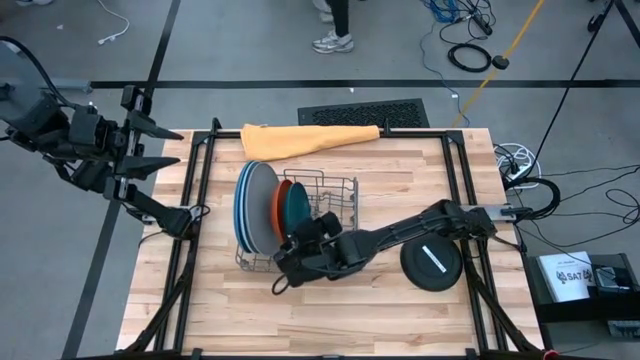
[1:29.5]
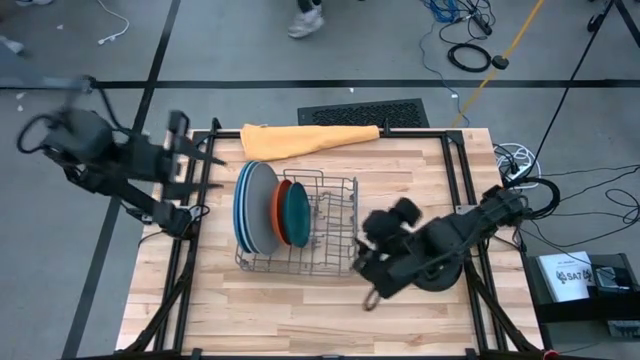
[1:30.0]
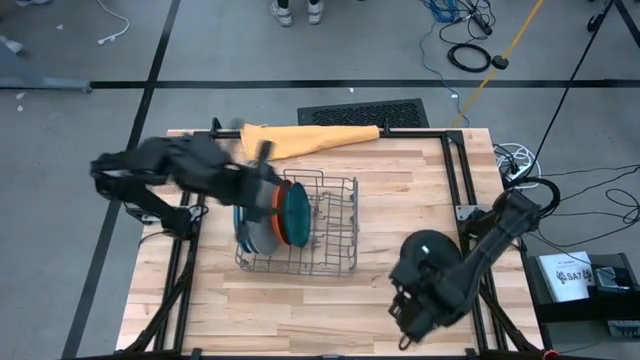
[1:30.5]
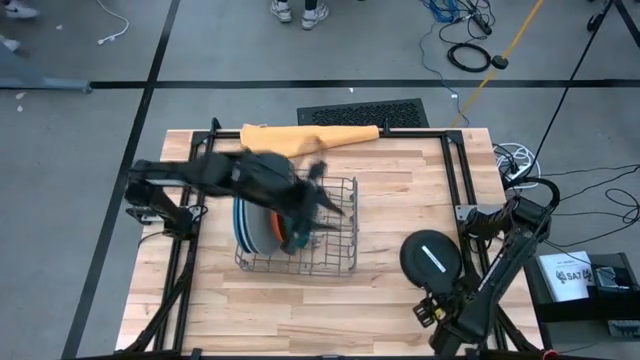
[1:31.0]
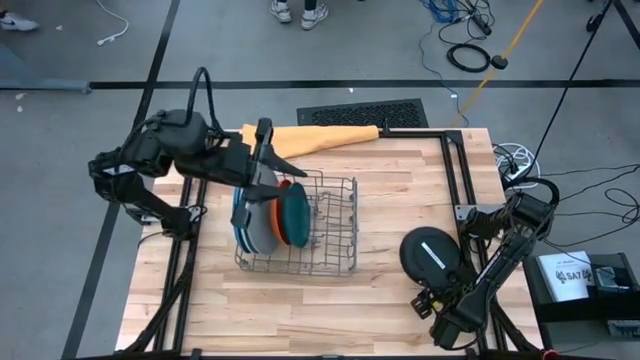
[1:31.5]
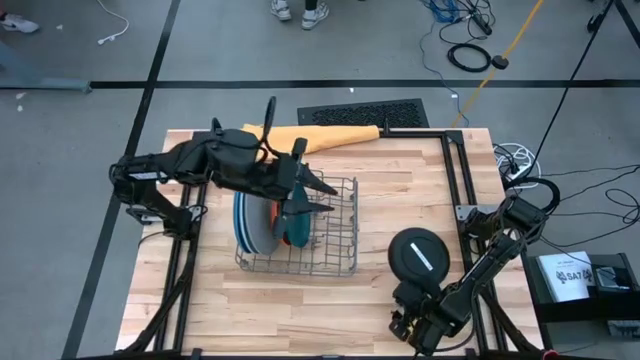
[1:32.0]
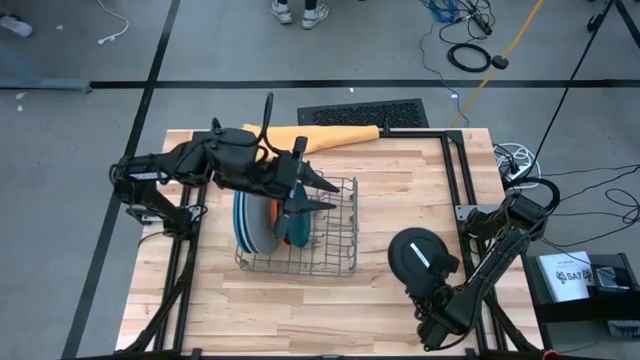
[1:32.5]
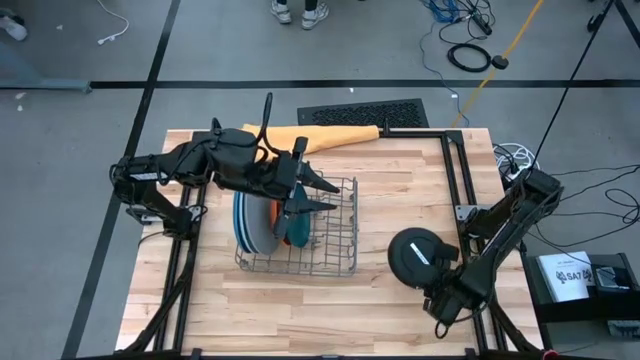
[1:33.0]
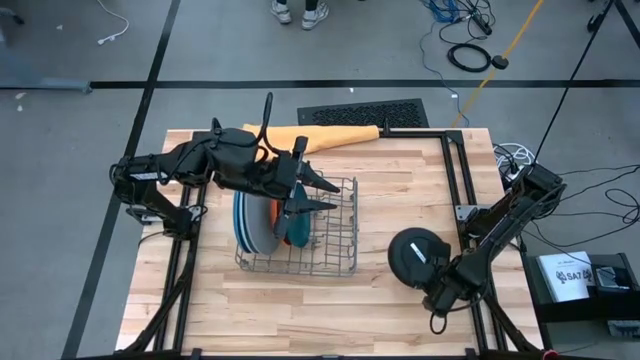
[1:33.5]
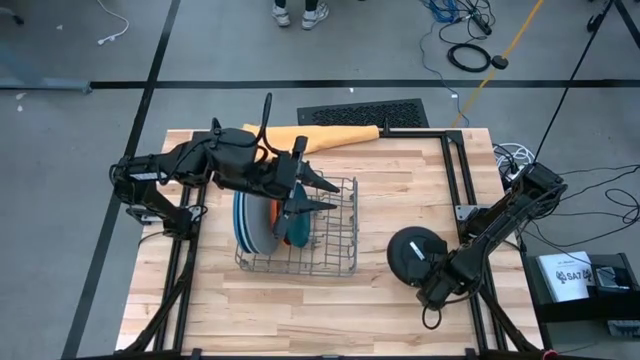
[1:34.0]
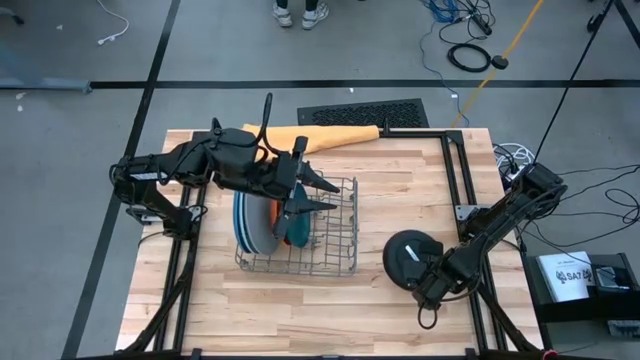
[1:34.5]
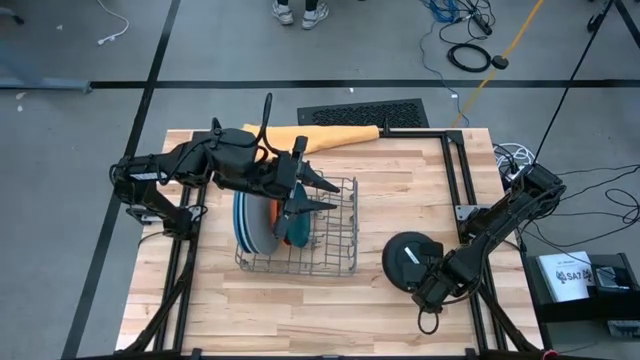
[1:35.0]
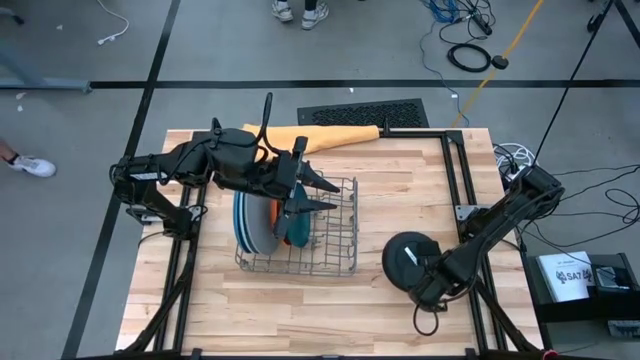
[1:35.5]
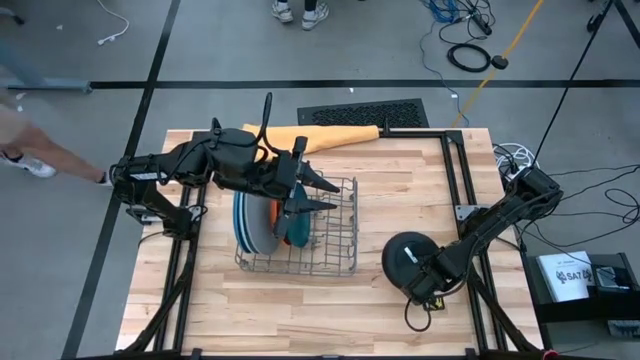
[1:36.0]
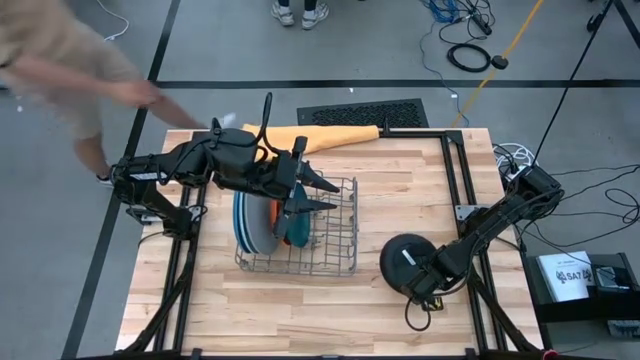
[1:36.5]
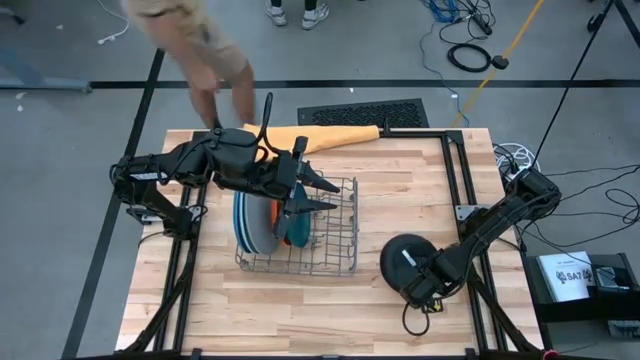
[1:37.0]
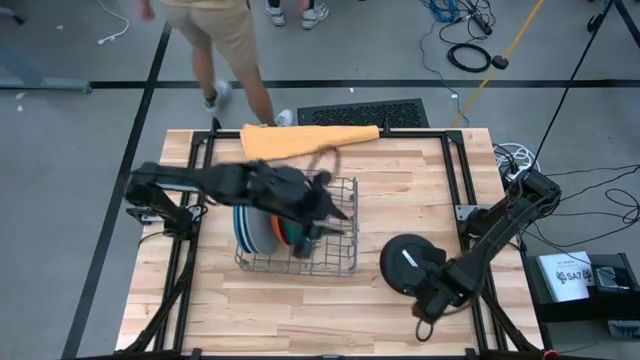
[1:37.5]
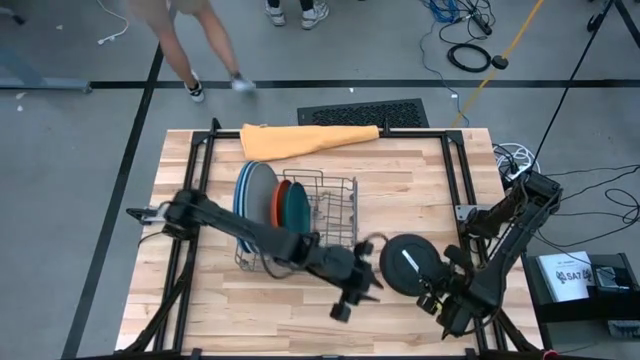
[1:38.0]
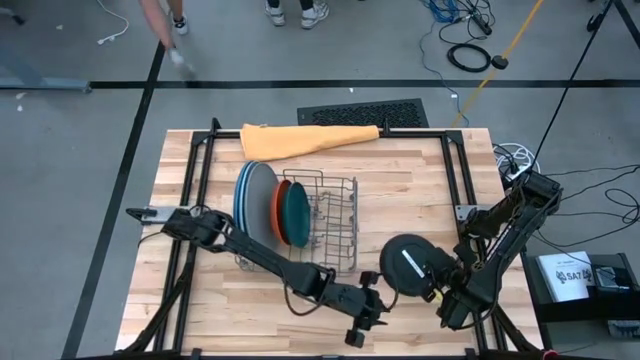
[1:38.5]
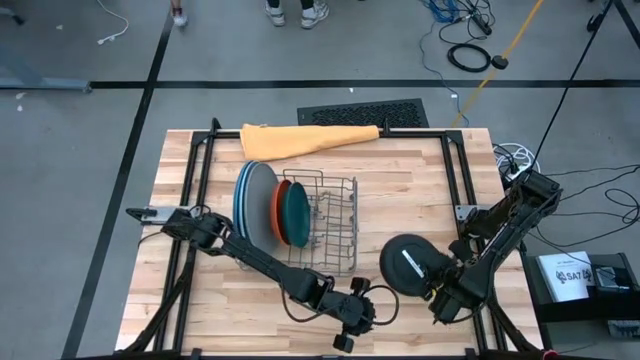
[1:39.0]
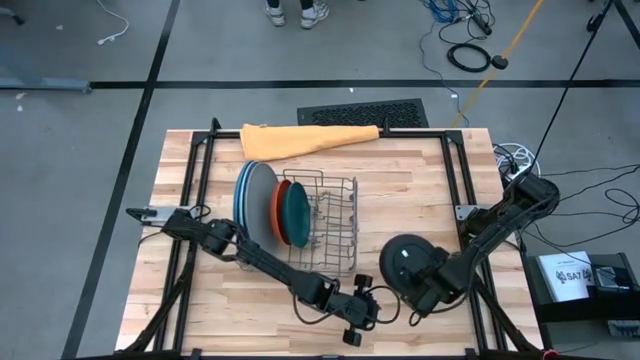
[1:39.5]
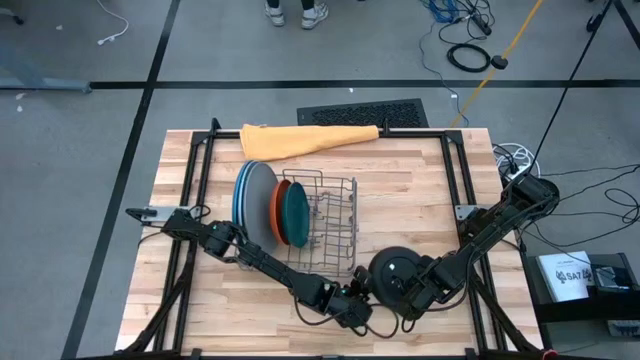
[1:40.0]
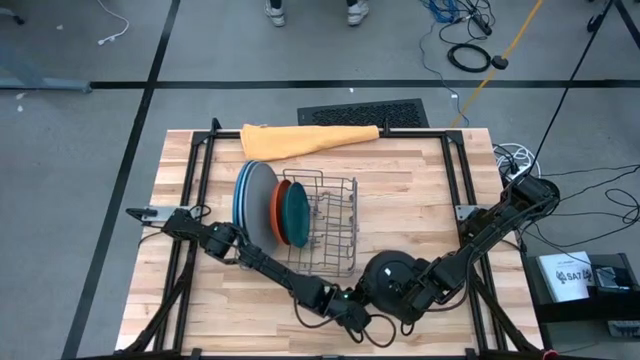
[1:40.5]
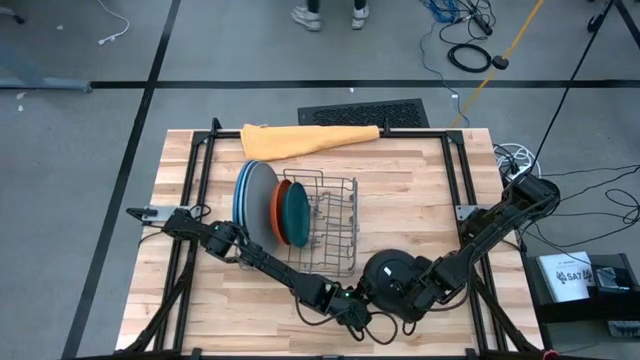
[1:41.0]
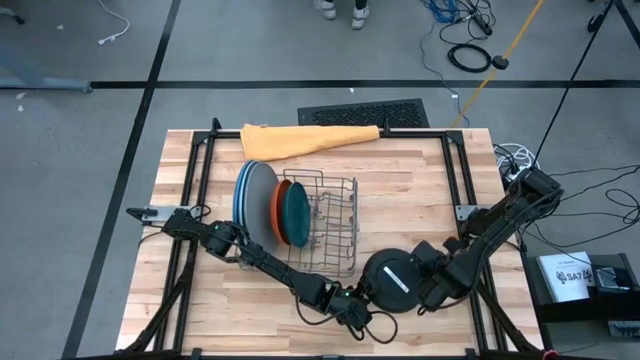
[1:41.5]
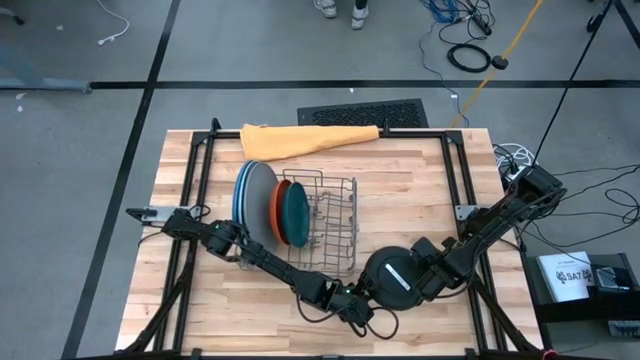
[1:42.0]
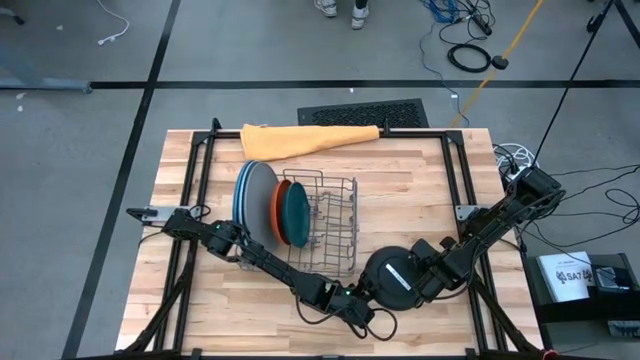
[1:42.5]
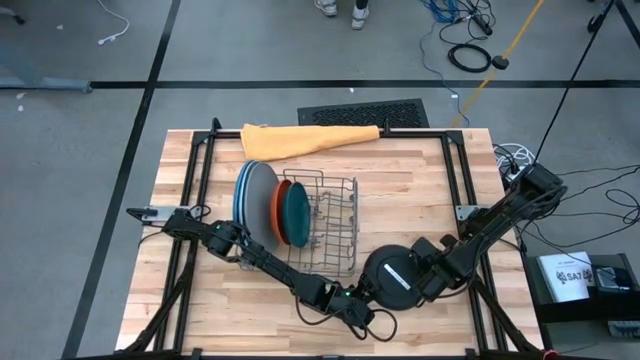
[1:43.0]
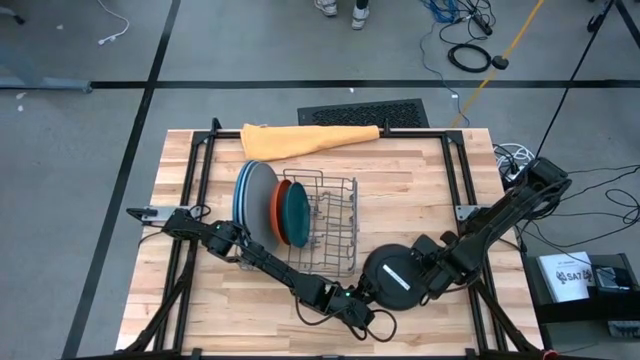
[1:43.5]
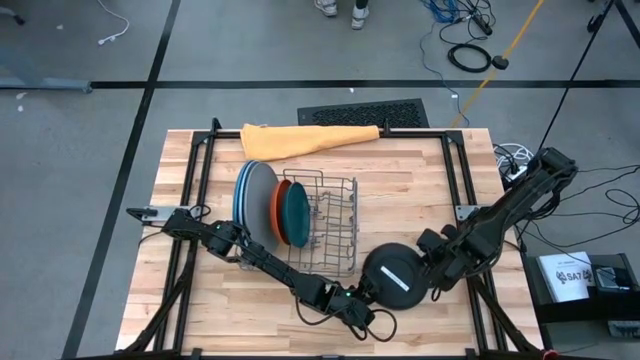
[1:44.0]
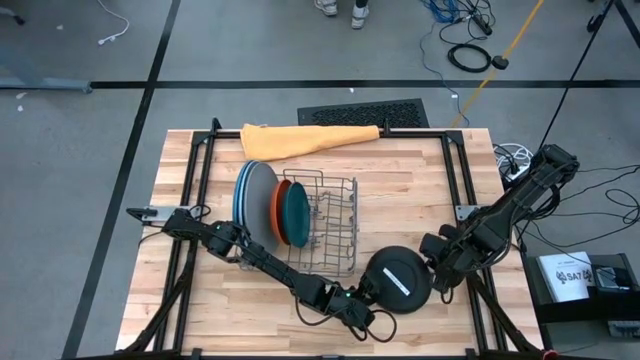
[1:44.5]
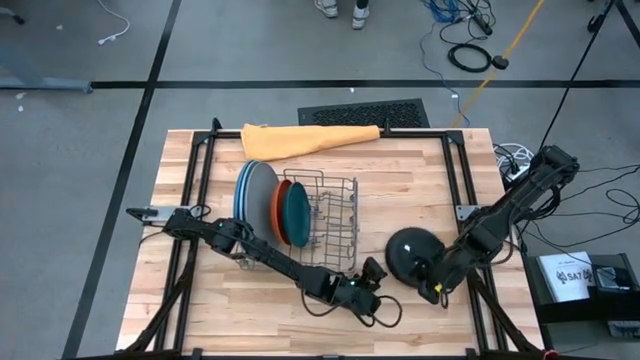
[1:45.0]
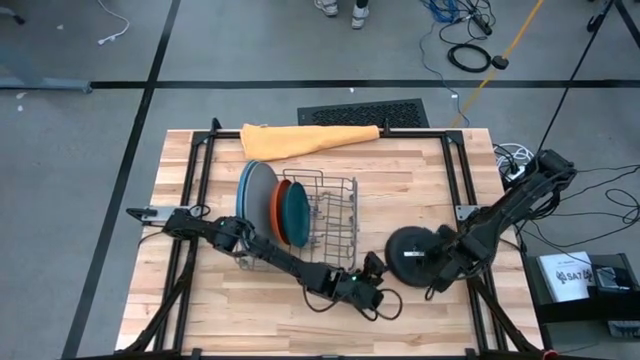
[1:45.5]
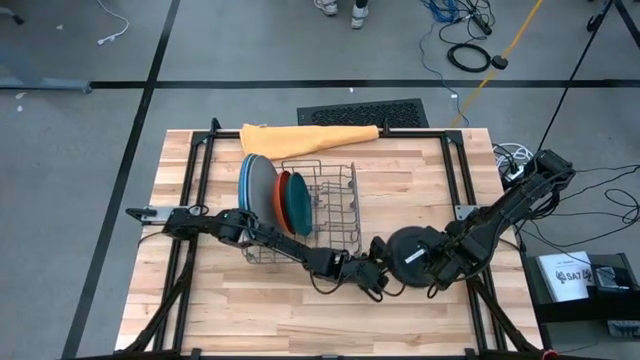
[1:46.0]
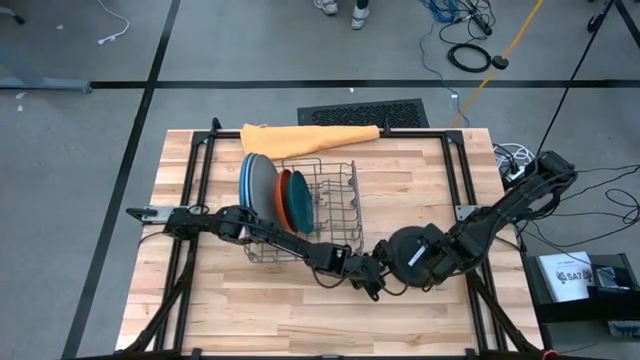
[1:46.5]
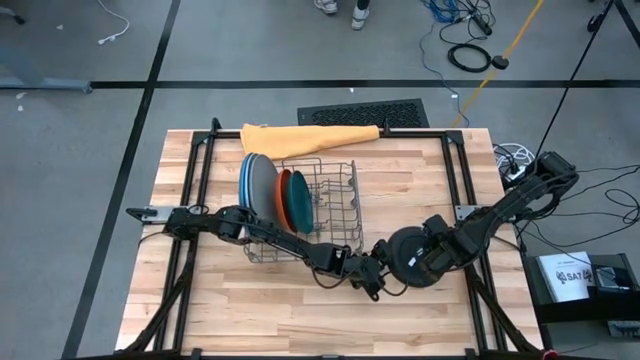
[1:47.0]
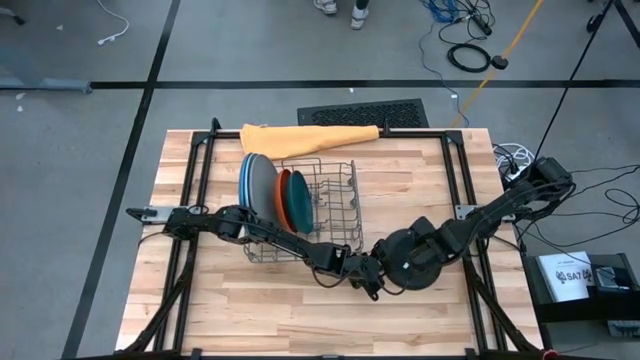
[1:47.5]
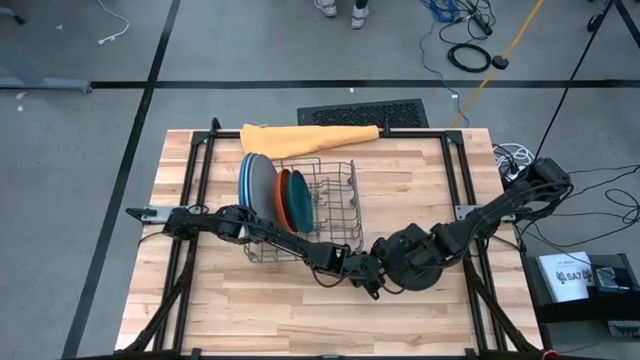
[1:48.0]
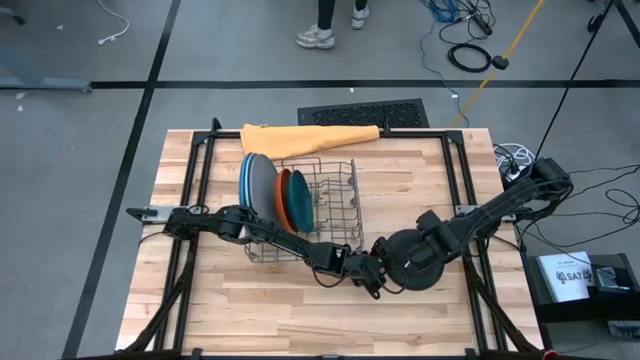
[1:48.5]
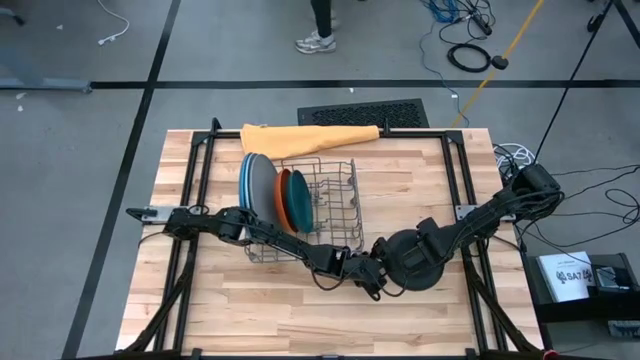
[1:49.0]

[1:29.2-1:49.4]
Task: Sort dishes
Put the black plate in the dish rack
